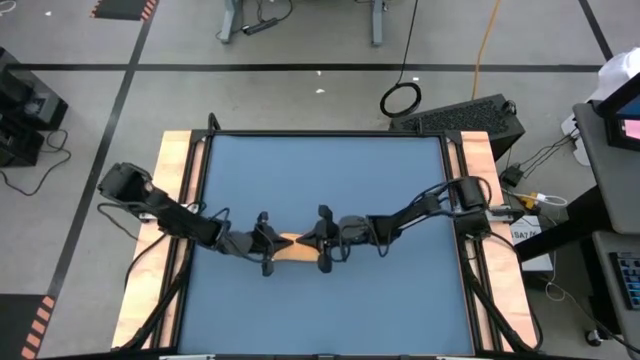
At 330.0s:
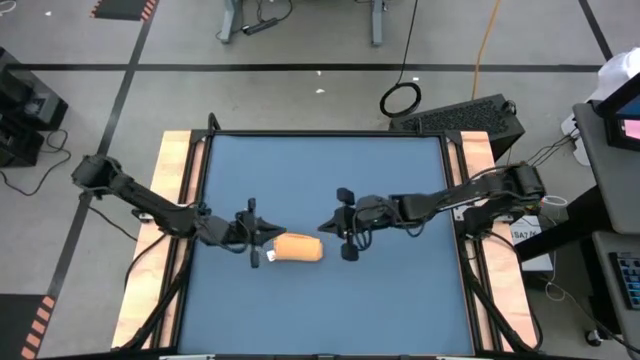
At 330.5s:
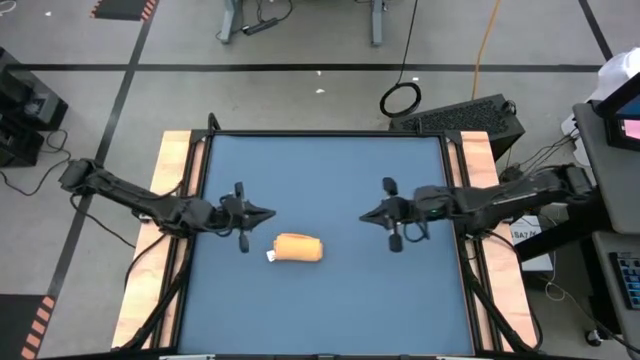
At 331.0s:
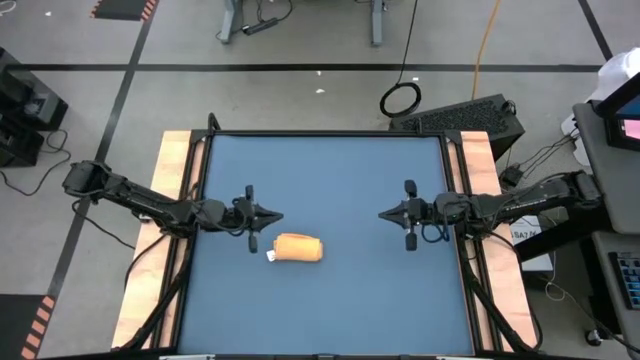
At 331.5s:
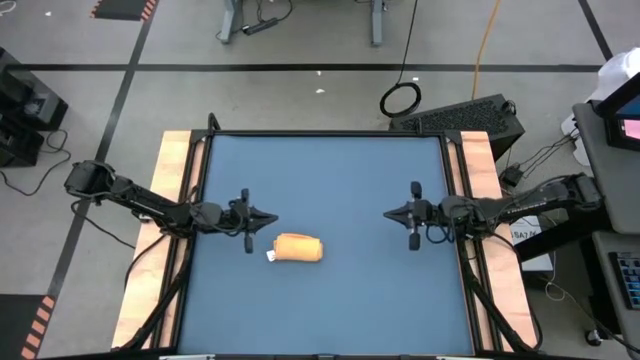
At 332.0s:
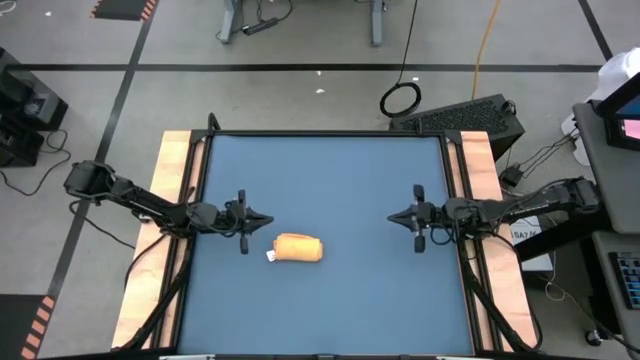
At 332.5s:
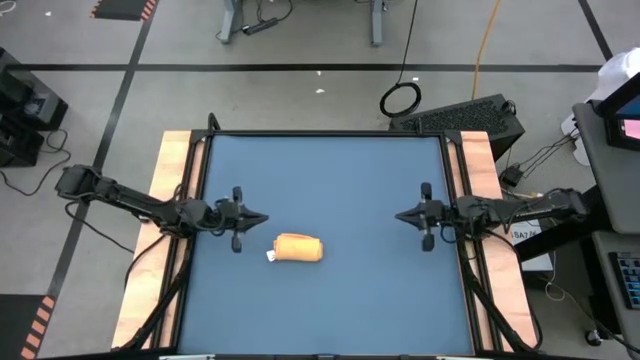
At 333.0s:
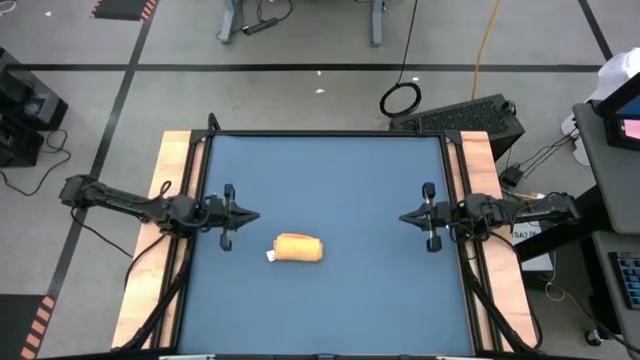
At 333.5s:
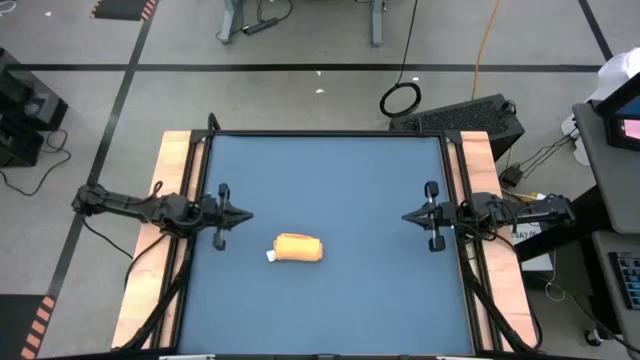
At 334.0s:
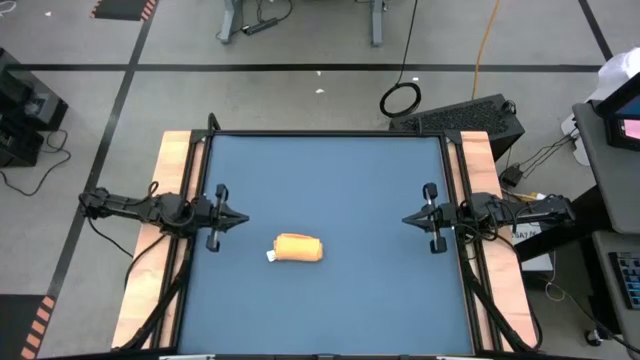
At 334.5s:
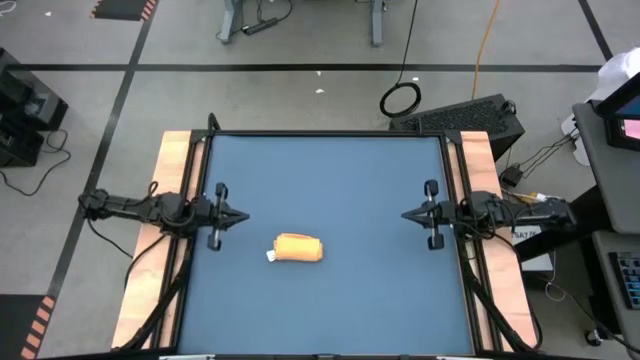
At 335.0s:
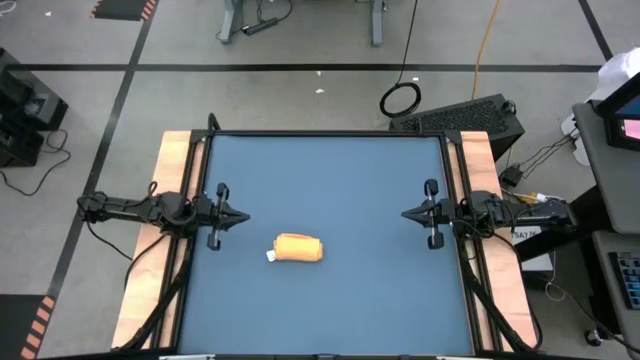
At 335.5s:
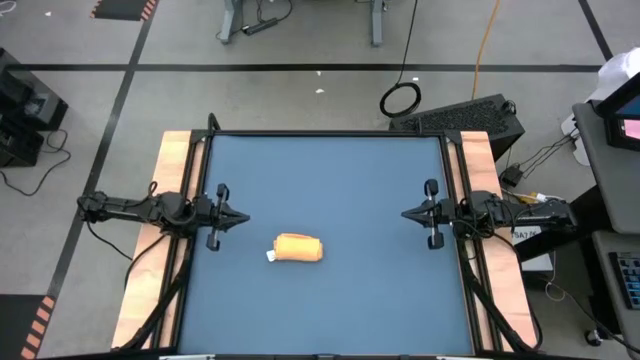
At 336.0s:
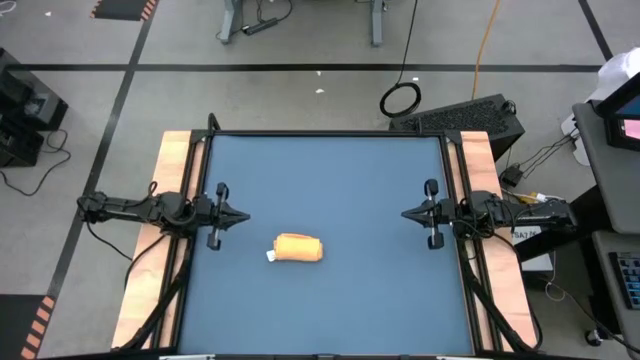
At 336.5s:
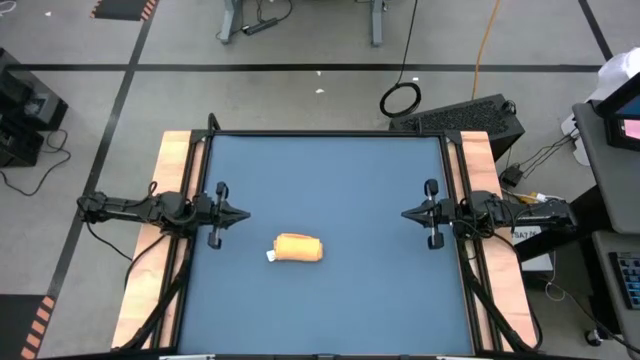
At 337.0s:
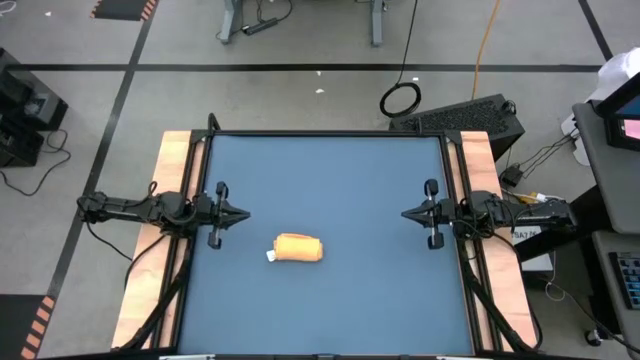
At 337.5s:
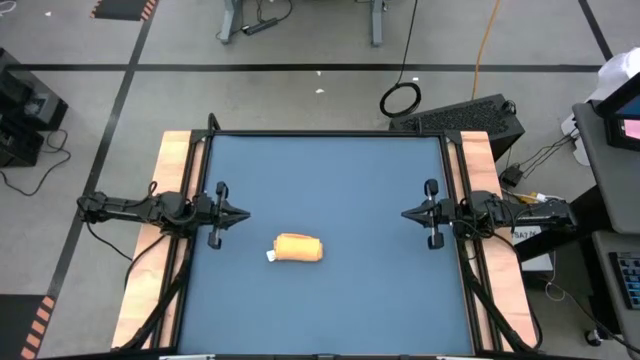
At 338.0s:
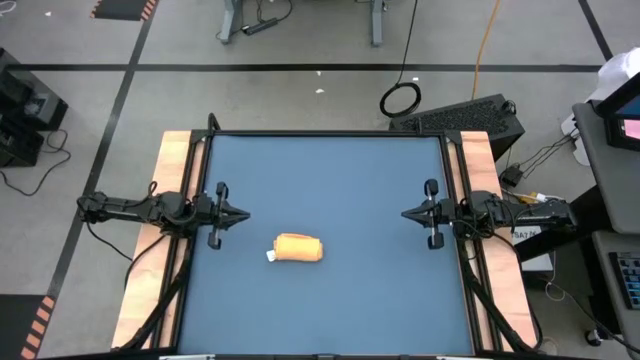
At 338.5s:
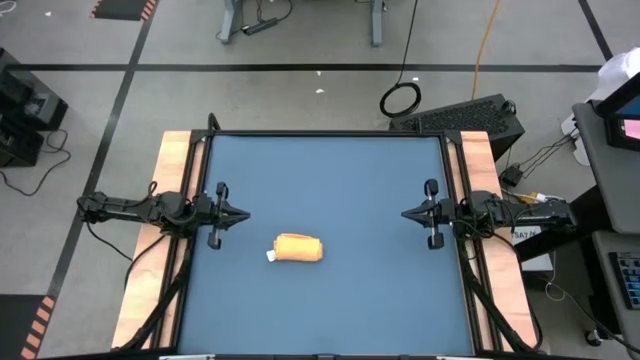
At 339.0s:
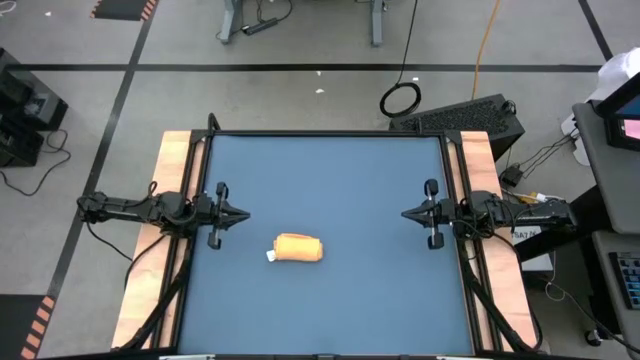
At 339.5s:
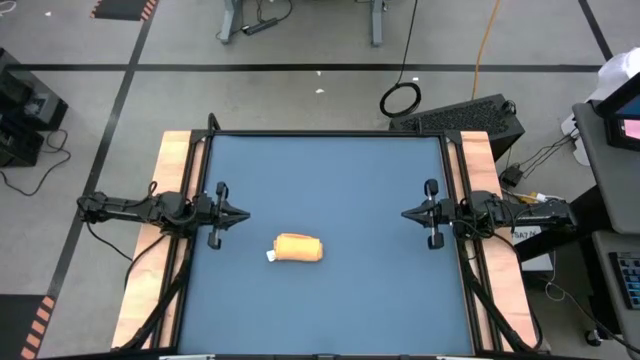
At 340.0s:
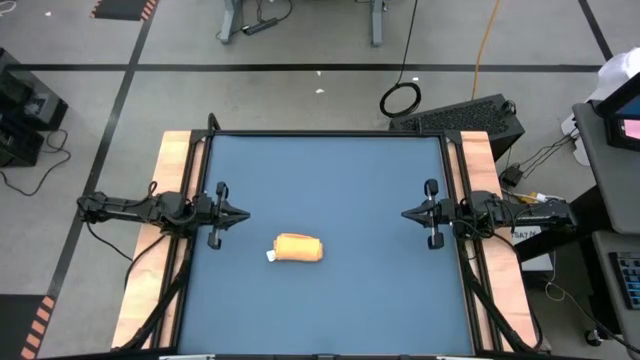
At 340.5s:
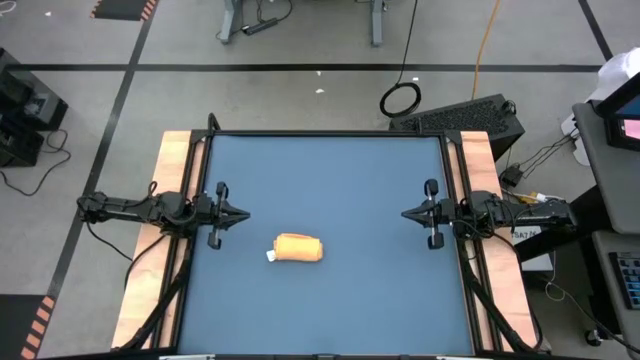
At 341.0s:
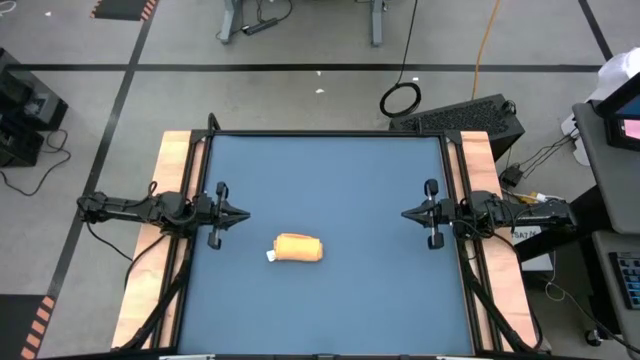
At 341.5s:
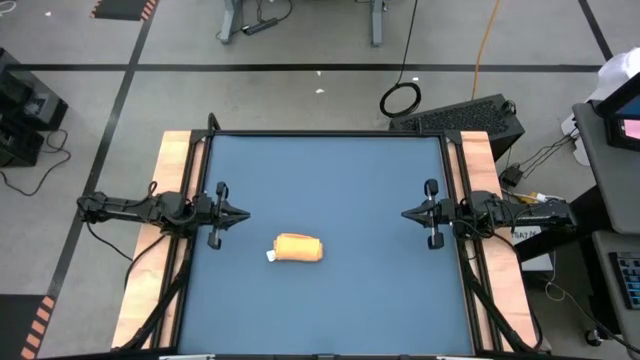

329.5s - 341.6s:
Task: Roll towel into tight, uniform cylinder
Return to Home Position

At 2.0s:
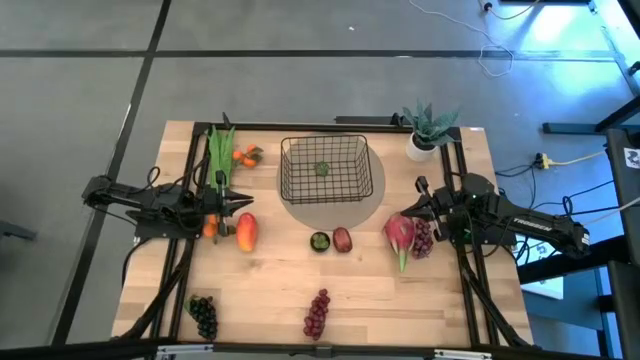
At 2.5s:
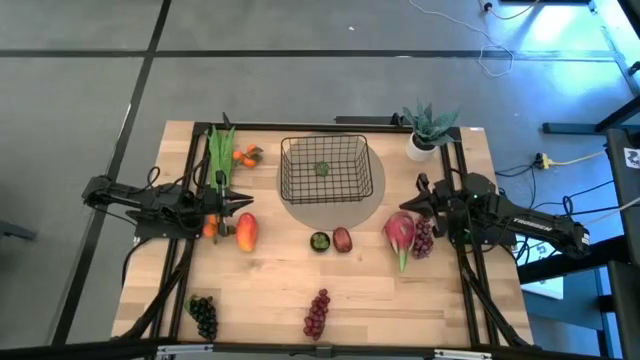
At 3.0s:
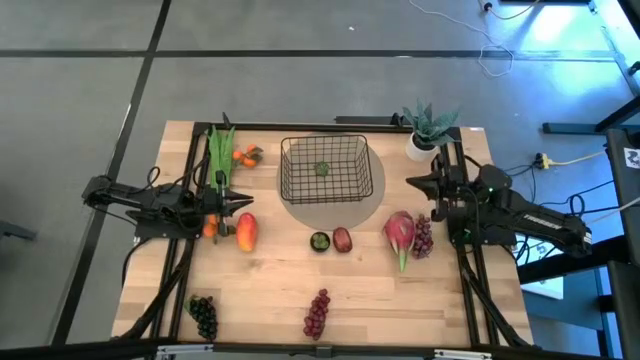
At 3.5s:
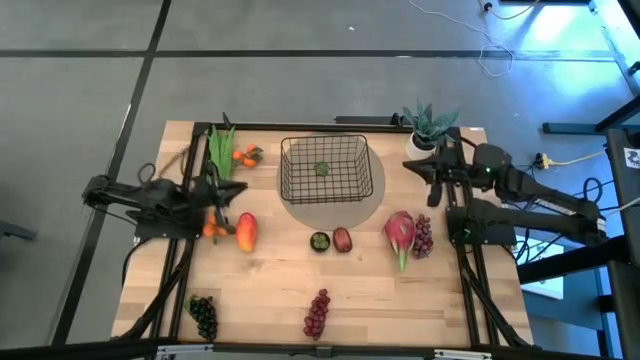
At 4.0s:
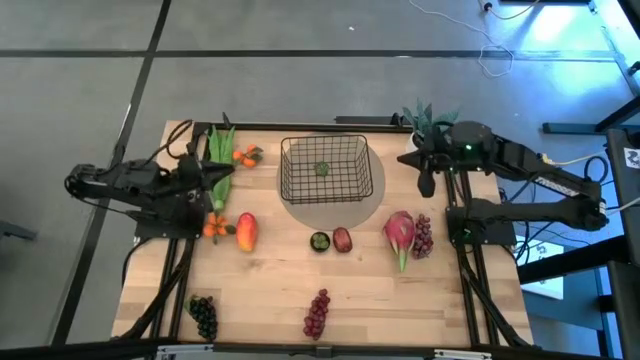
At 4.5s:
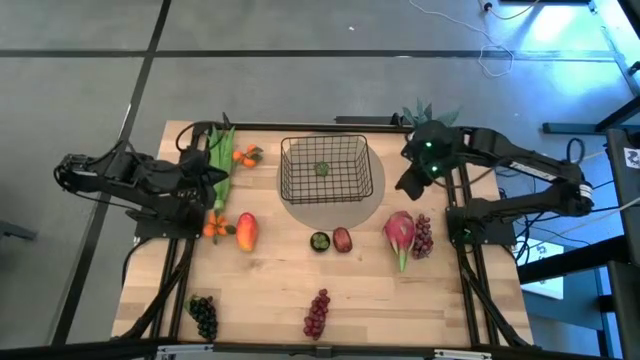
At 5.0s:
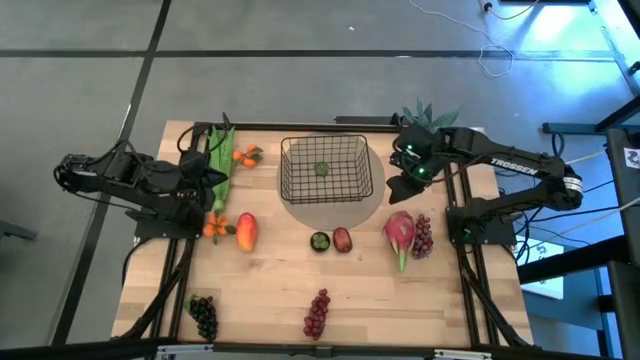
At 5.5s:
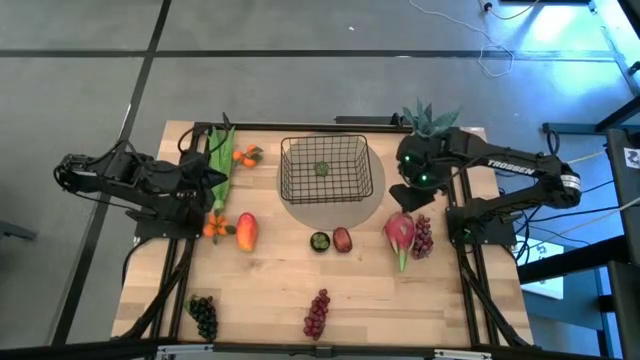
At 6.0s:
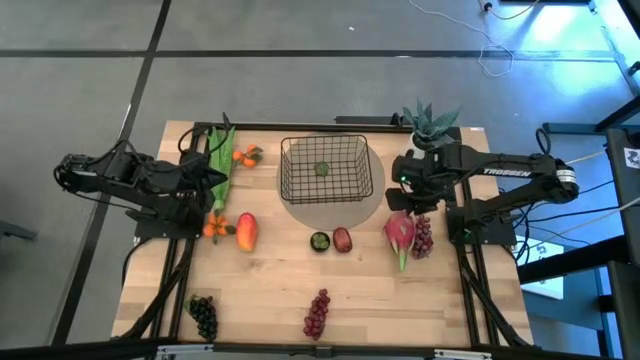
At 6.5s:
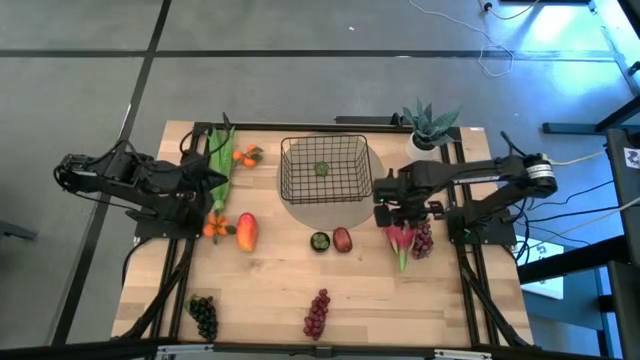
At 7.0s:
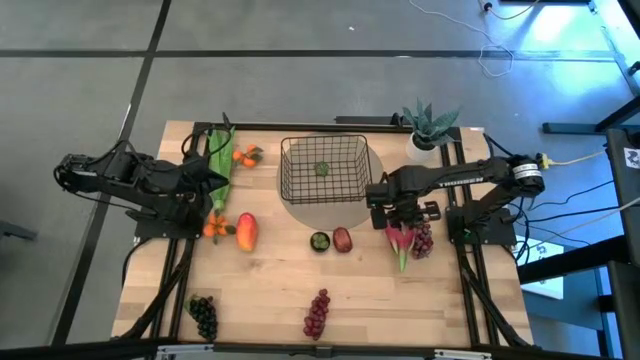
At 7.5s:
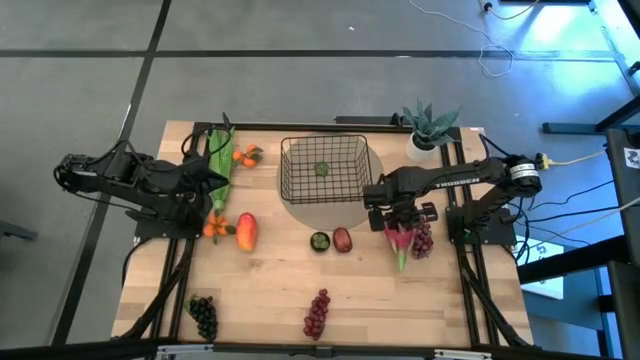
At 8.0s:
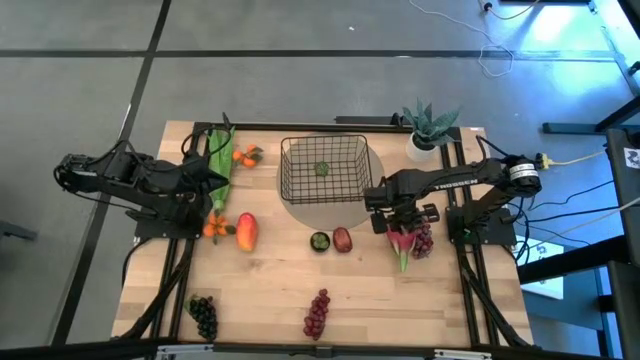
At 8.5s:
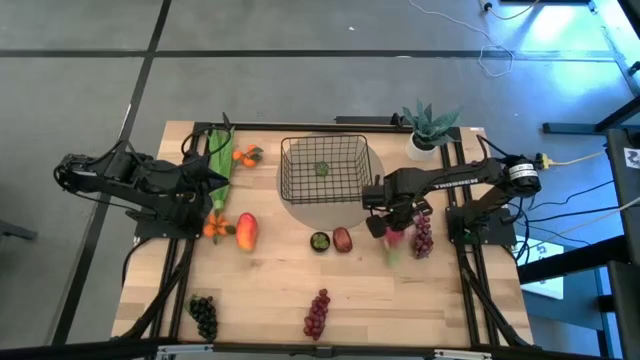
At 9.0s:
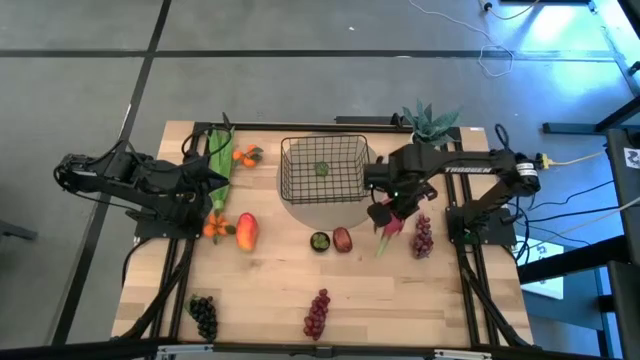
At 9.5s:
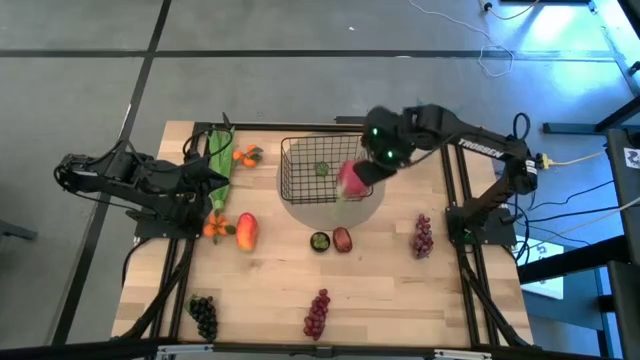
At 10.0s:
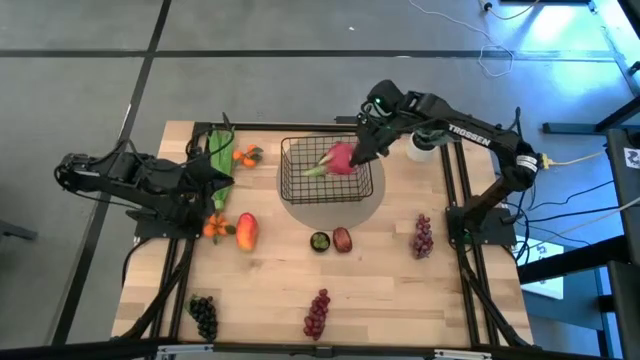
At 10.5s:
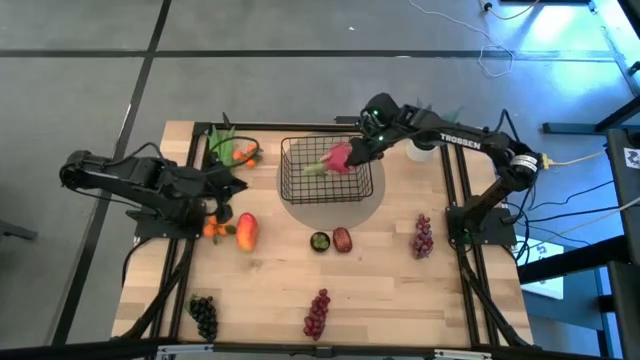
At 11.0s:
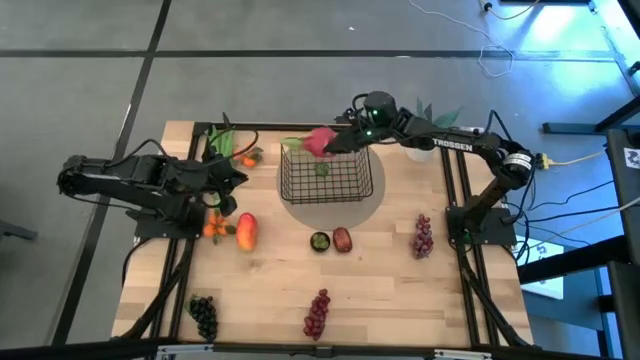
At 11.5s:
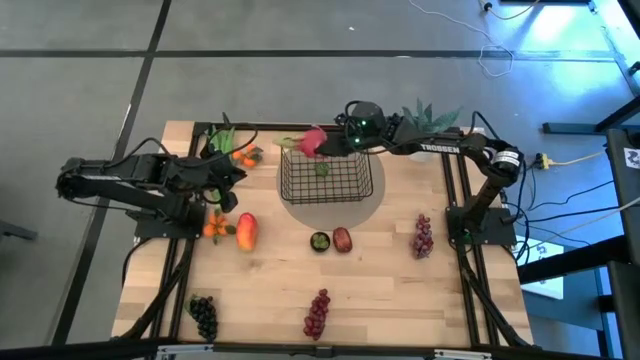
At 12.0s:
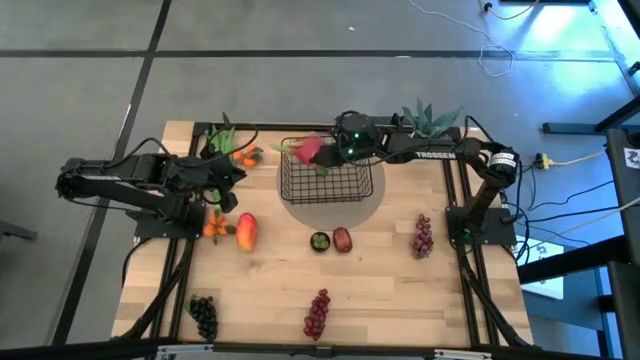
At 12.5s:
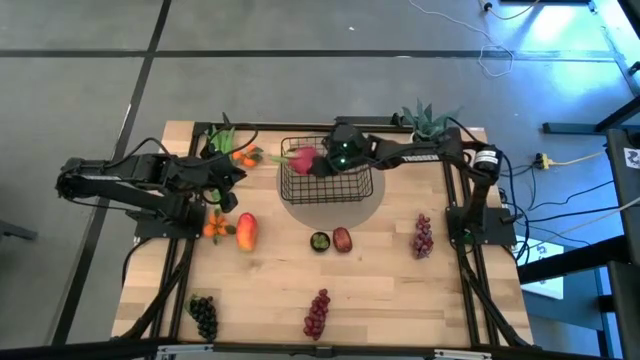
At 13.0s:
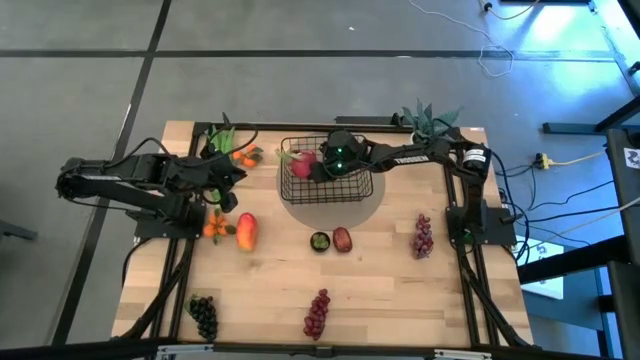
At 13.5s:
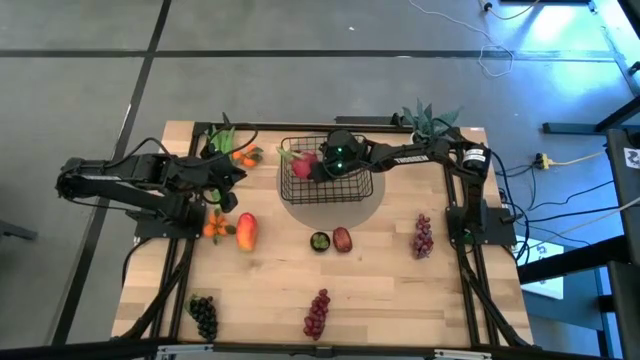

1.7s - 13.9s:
Task: Build produce basket
Put the dragon fruit into the wire basket
